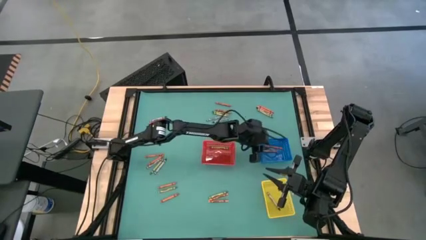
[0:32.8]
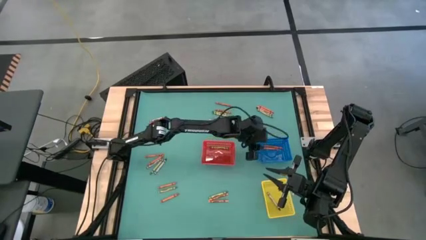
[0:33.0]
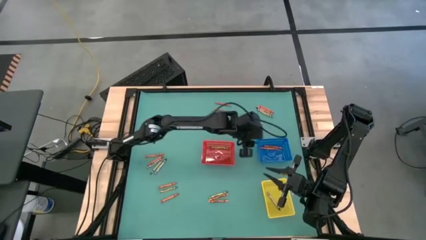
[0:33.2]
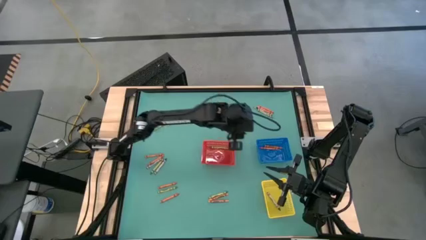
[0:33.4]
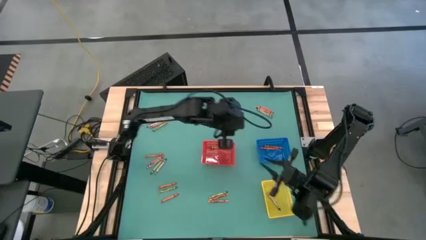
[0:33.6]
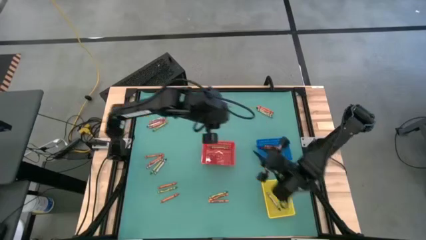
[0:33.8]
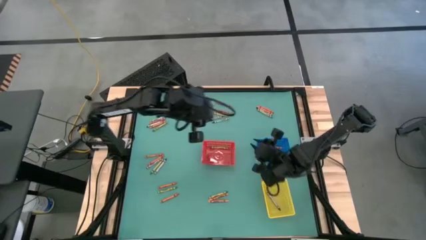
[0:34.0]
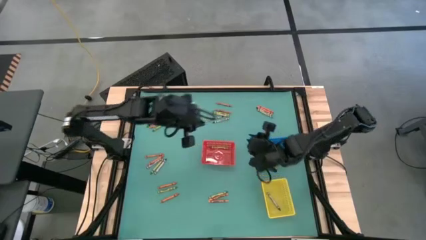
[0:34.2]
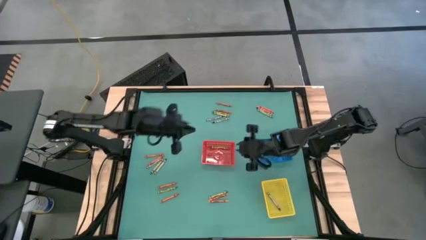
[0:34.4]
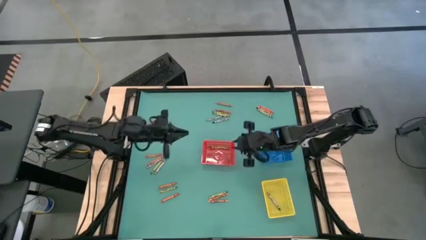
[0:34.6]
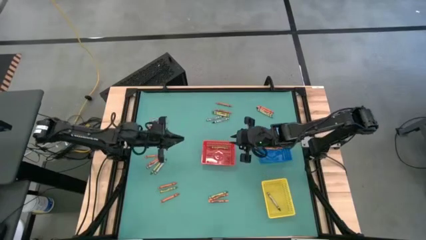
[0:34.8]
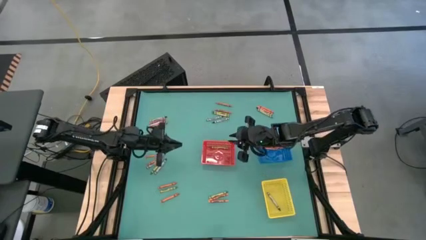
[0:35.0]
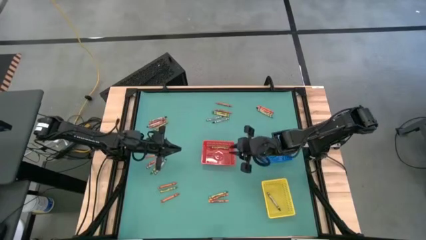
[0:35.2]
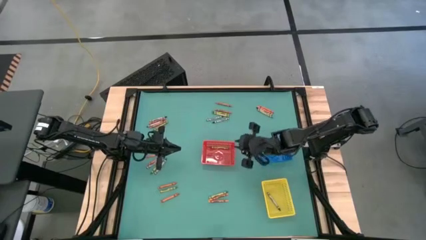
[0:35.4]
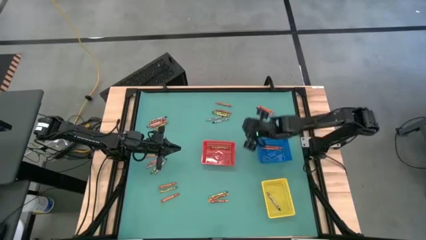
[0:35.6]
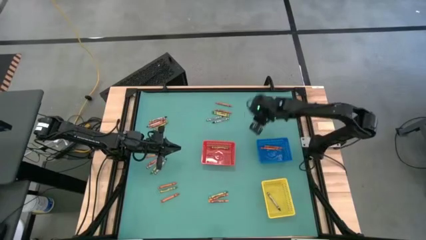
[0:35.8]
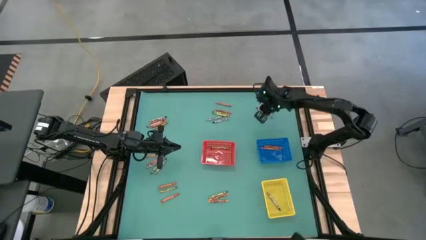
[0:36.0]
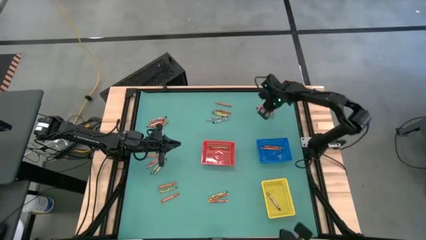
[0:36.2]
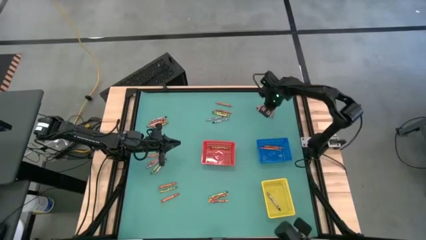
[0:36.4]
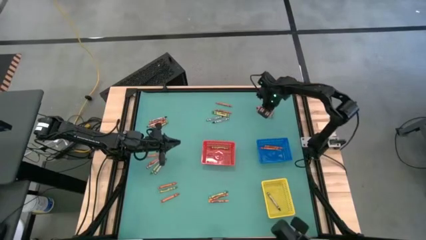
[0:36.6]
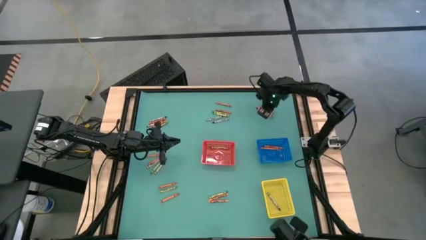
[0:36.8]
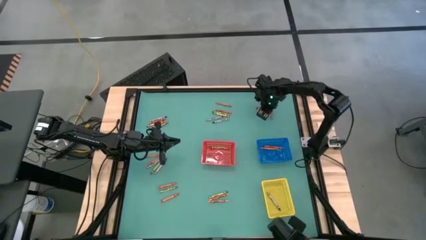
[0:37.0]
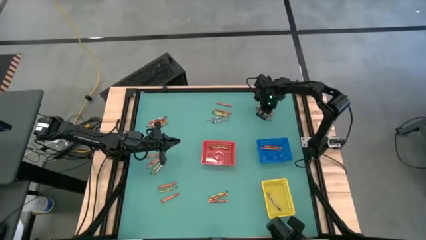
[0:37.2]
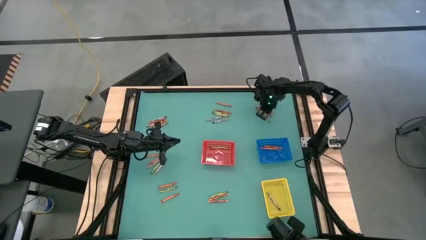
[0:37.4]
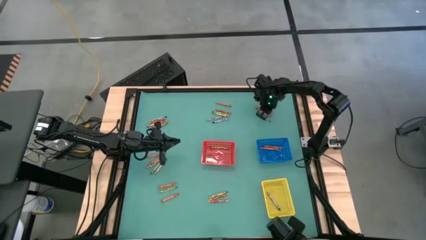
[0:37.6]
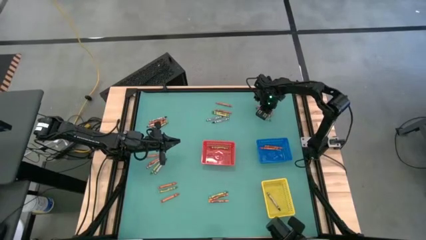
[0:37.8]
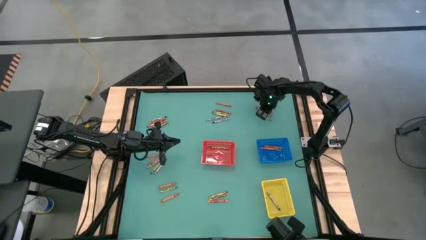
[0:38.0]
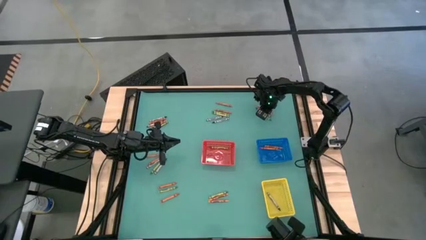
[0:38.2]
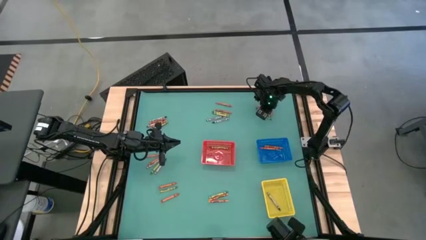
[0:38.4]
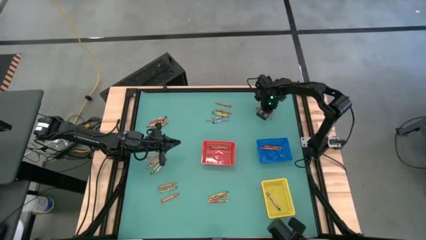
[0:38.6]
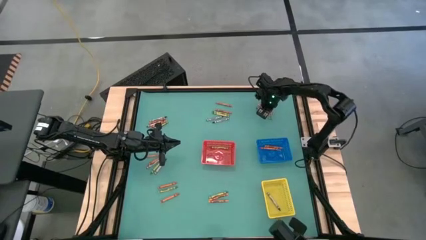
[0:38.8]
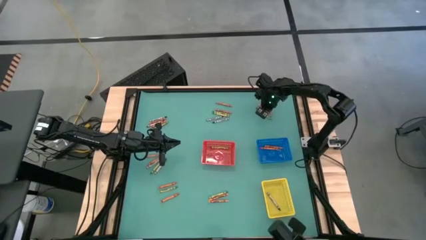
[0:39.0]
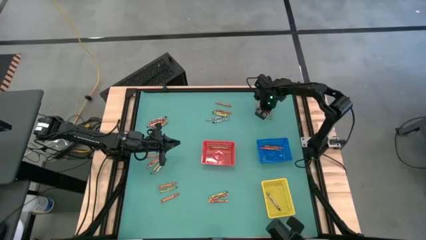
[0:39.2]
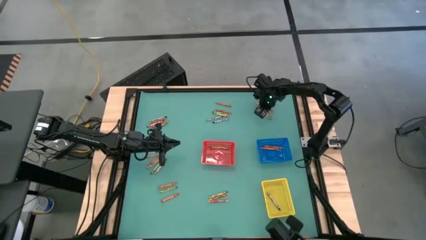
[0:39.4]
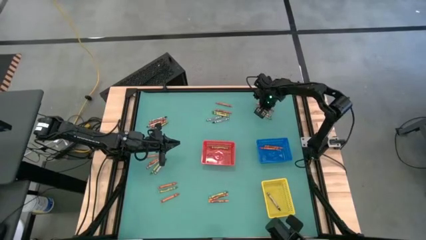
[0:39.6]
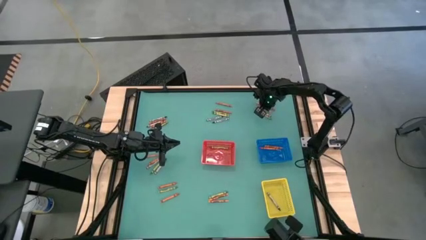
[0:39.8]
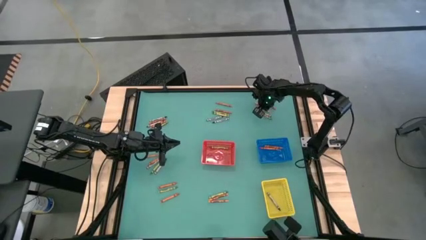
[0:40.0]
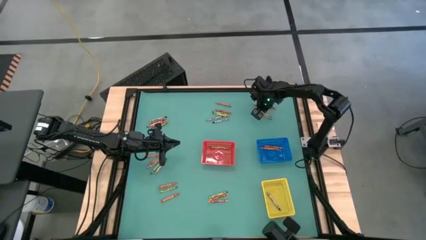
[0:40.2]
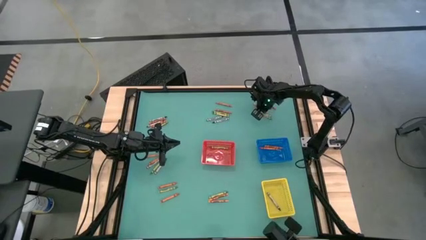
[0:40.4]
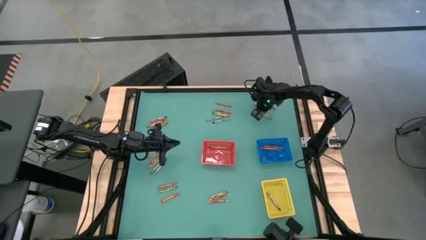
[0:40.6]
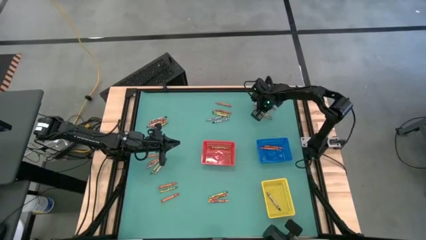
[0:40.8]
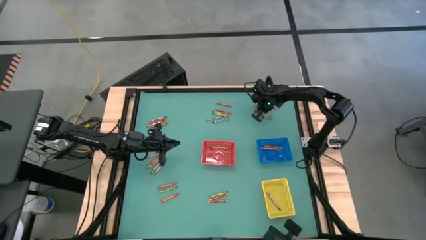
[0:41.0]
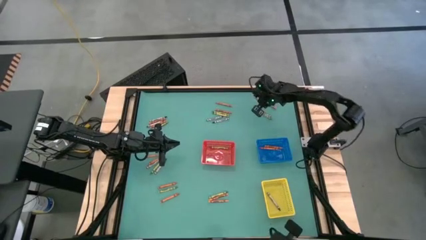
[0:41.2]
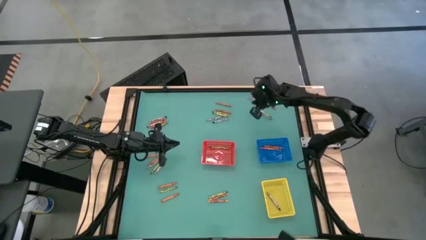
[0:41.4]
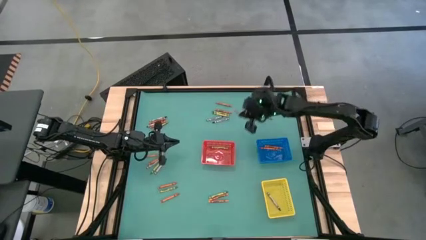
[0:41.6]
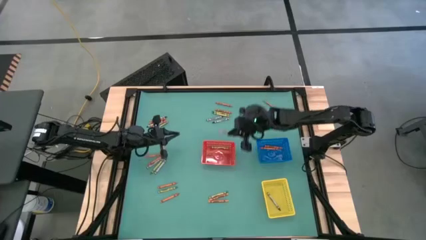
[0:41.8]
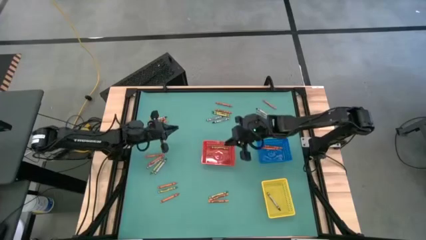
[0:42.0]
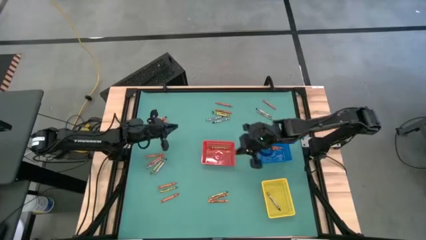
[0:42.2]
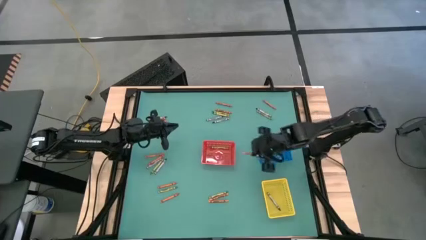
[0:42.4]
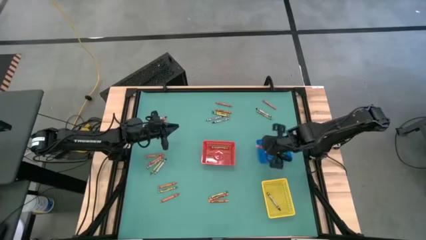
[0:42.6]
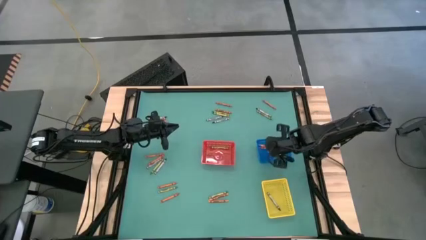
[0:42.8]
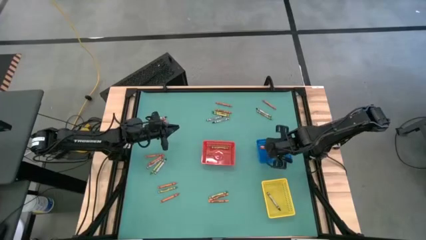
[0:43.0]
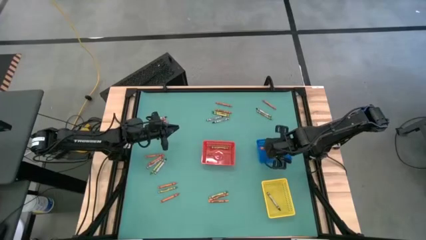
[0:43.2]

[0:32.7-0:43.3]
Task: Sort crayons
Put the orange crayon into the blue basket

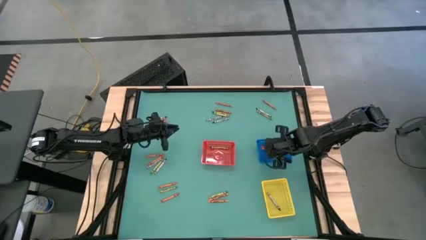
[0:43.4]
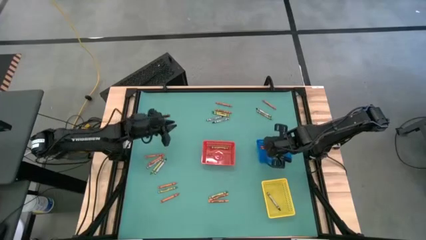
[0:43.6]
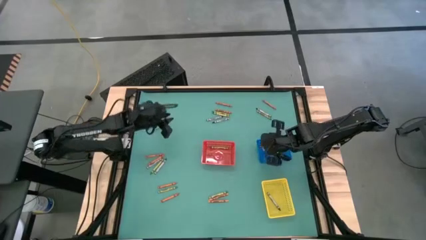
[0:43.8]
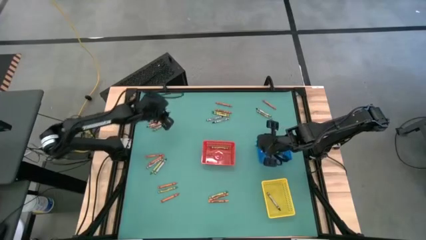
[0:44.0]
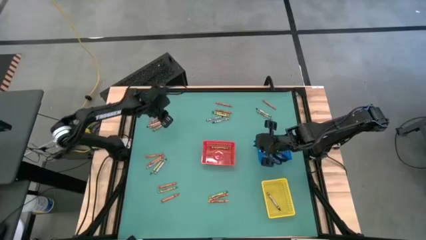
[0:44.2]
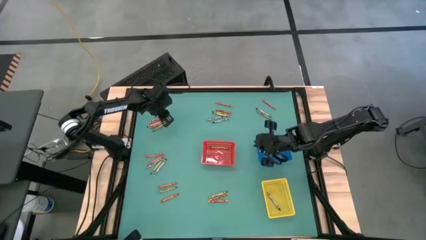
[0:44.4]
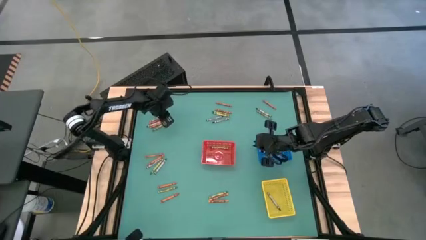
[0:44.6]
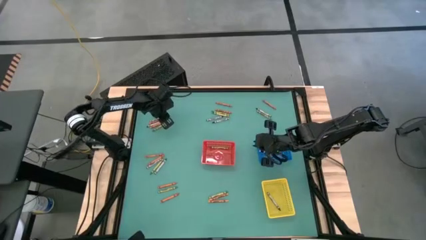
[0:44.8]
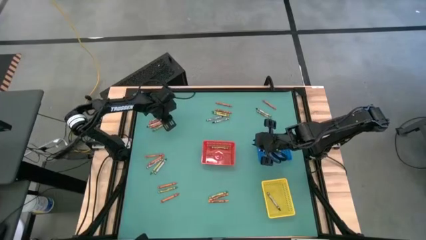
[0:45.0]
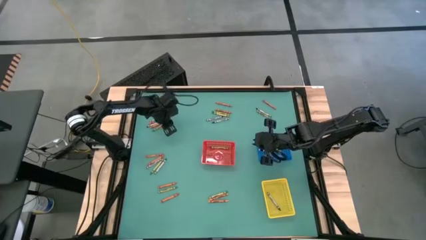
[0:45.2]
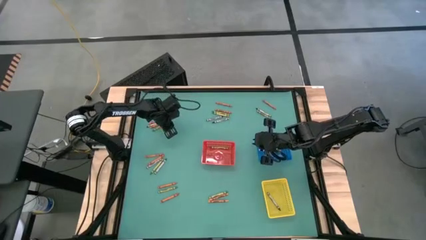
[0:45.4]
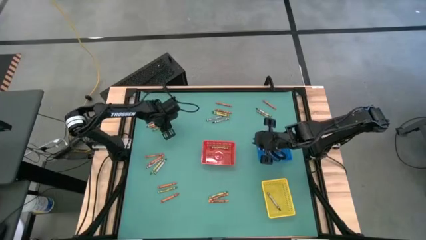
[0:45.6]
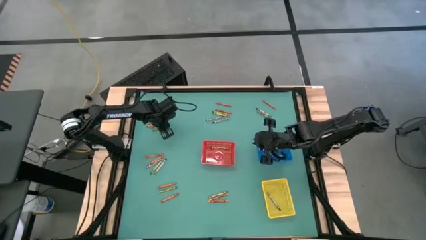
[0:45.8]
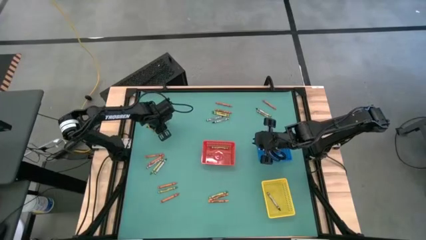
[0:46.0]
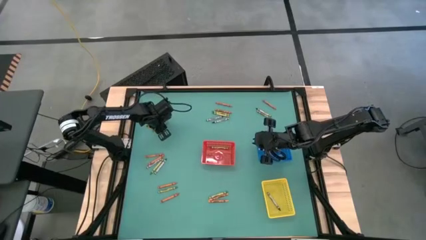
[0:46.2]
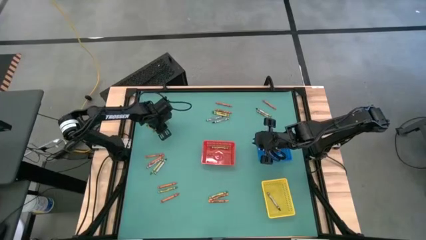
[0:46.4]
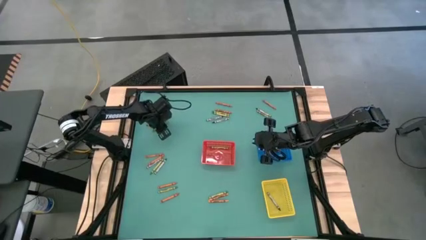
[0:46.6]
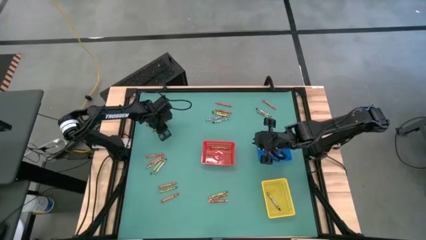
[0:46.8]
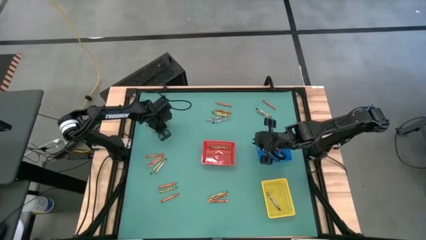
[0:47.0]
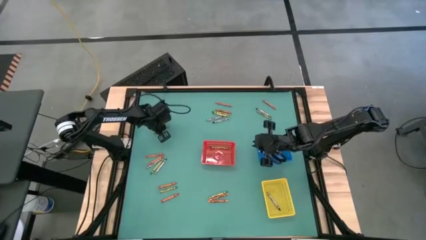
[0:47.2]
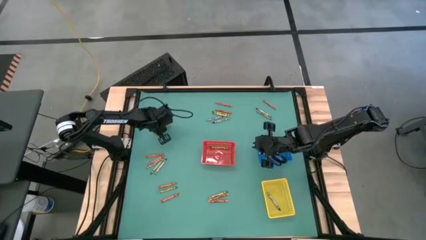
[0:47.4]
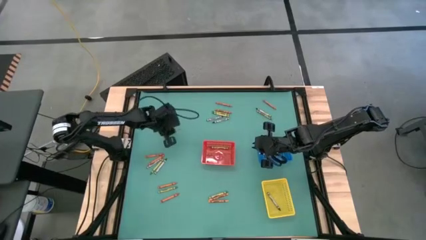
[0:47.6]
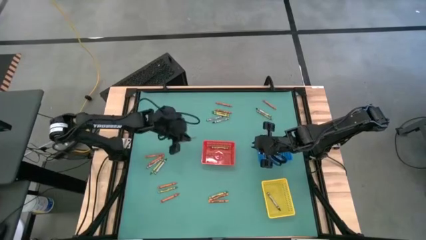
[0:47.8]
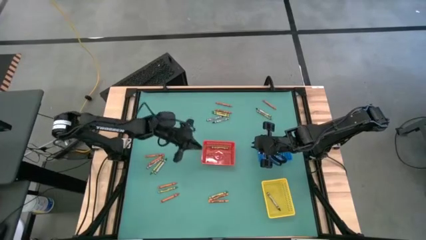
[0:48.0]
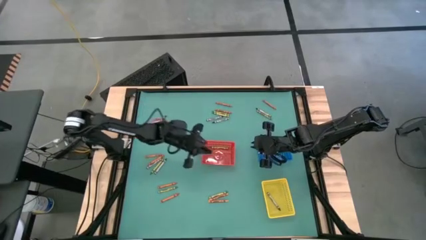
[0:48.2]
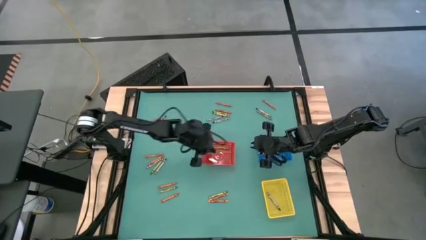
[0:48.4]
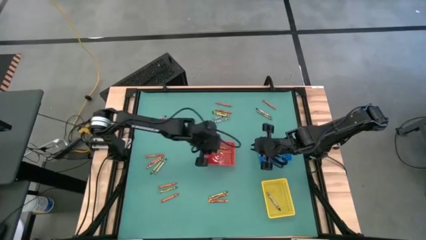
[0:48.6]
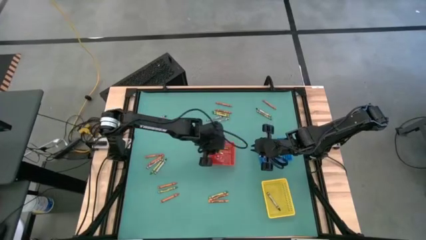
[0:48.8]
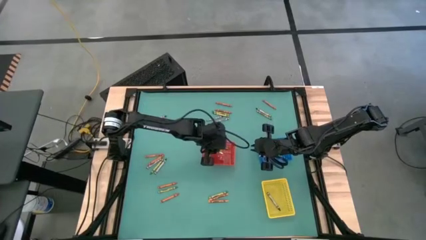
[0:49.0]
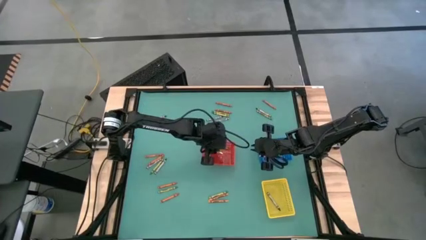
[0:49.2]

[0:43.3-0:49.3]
Put the green crayon into the red basket
